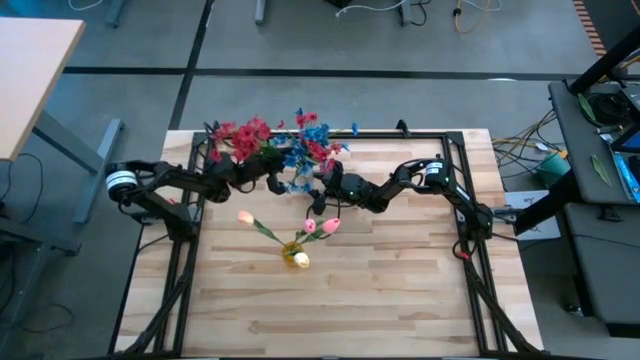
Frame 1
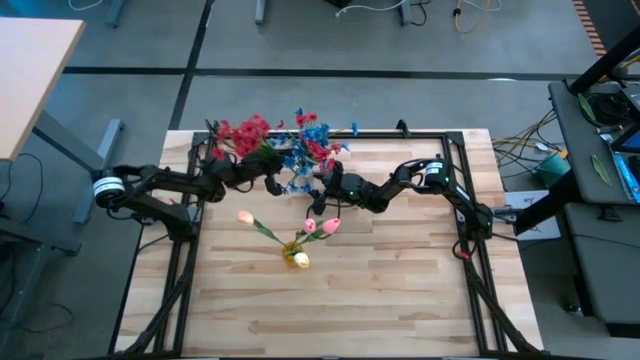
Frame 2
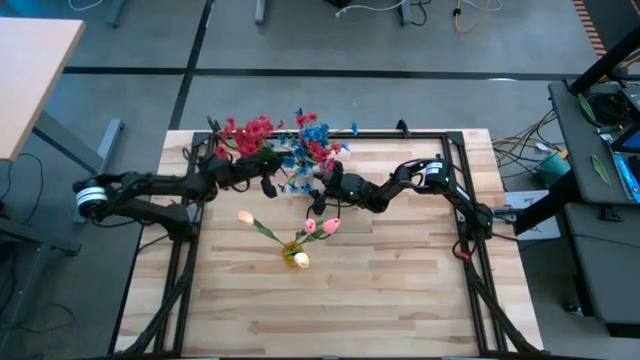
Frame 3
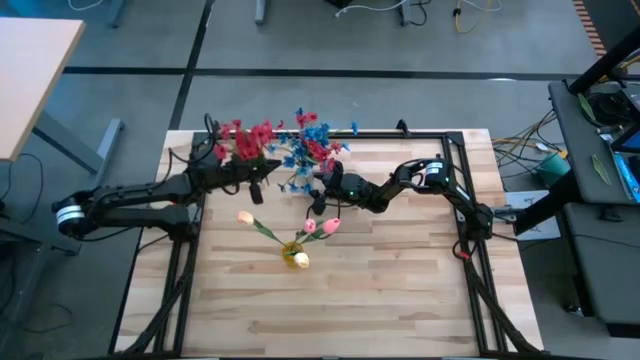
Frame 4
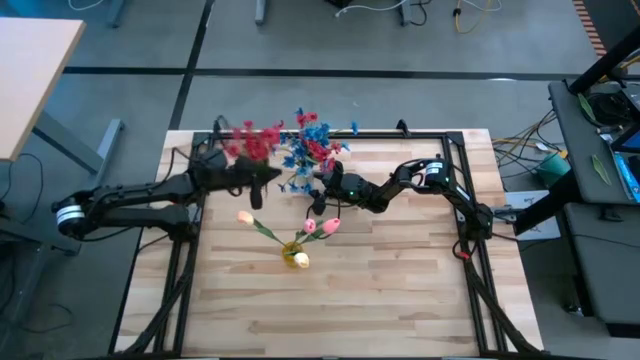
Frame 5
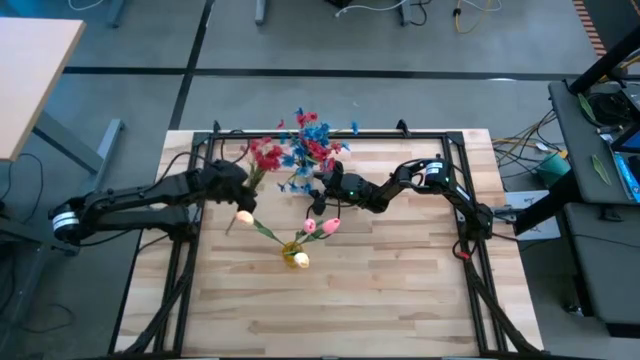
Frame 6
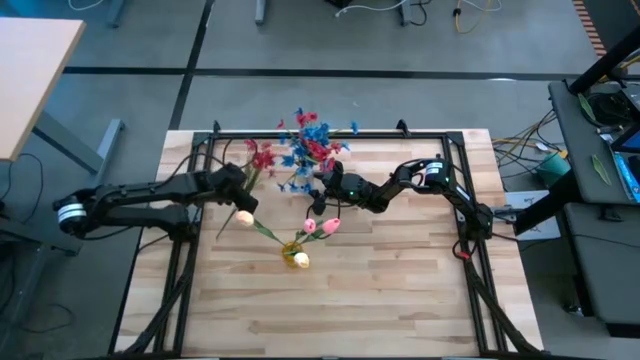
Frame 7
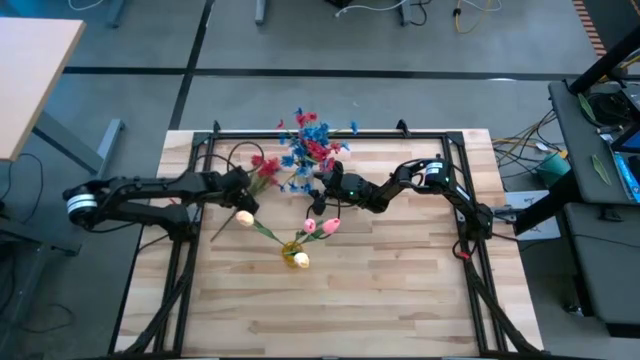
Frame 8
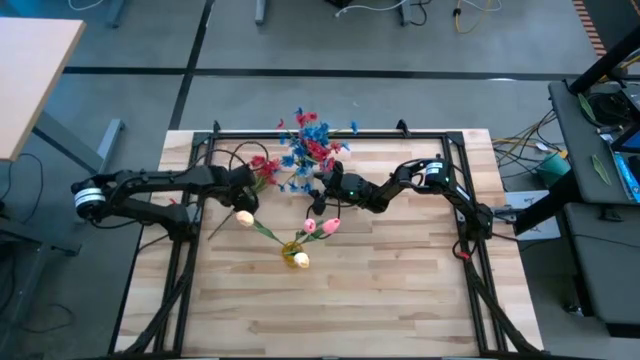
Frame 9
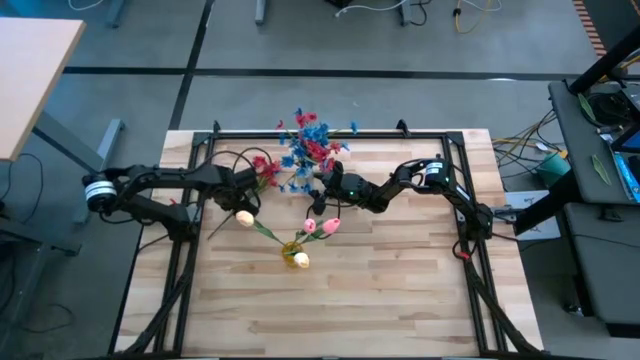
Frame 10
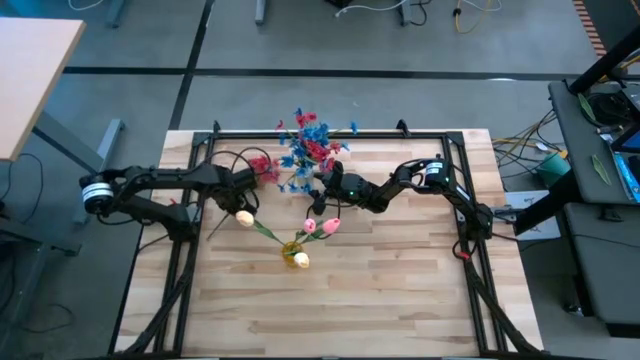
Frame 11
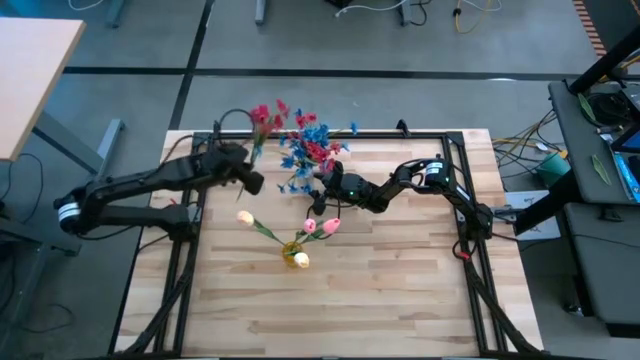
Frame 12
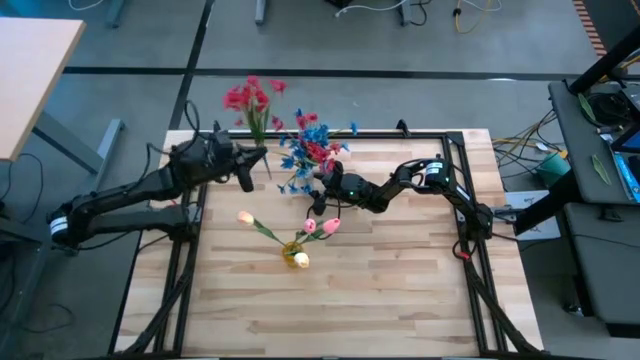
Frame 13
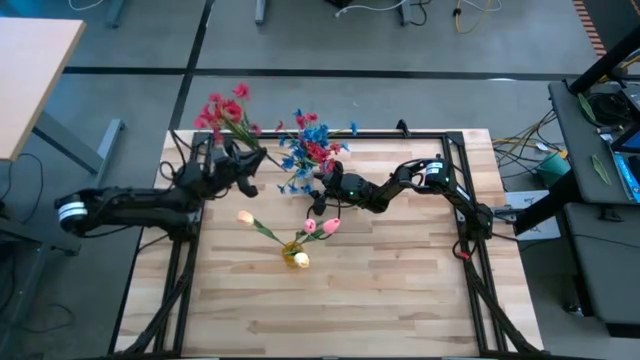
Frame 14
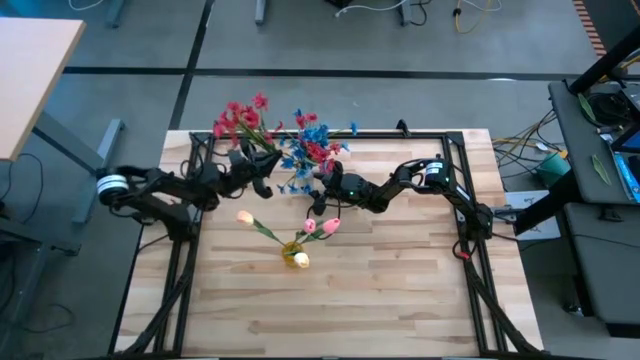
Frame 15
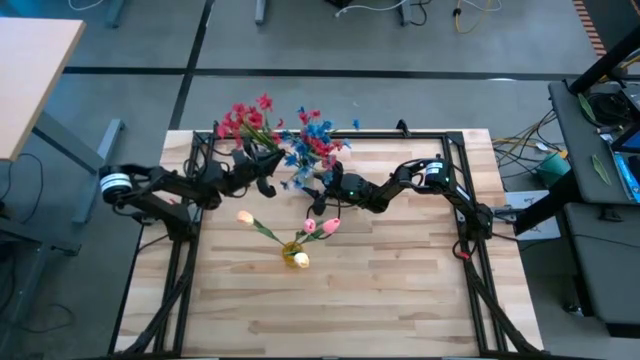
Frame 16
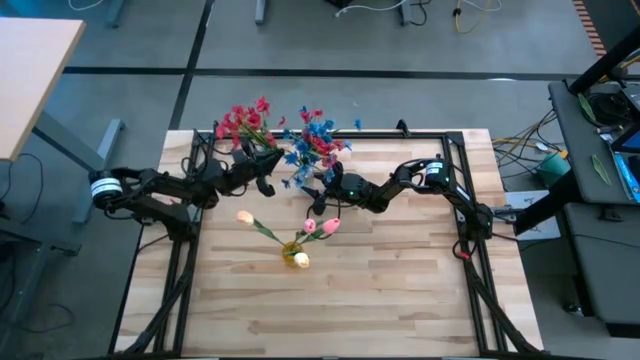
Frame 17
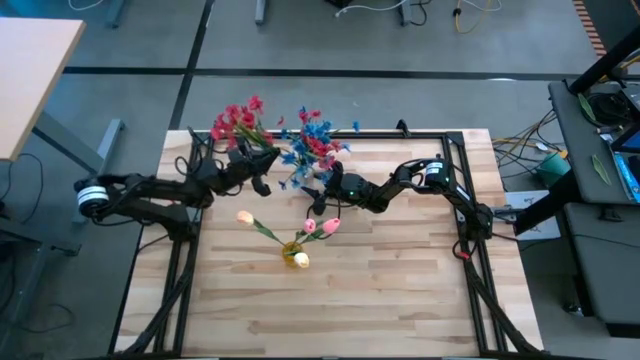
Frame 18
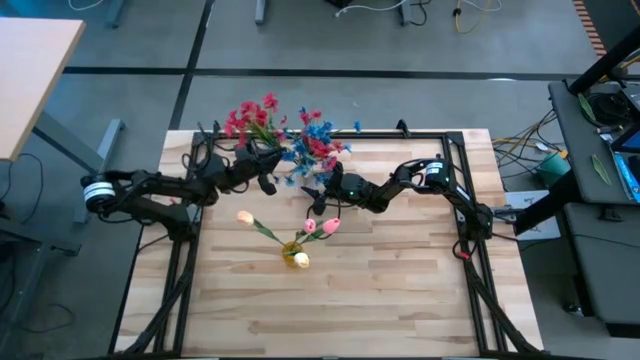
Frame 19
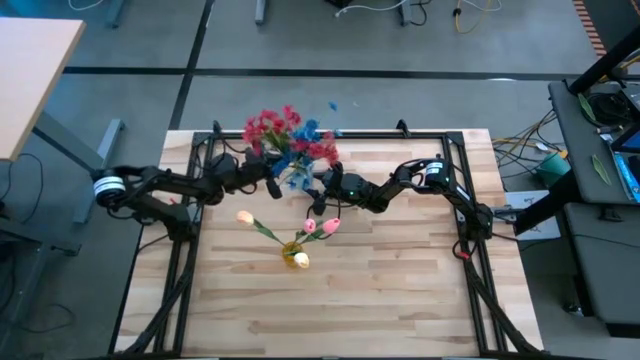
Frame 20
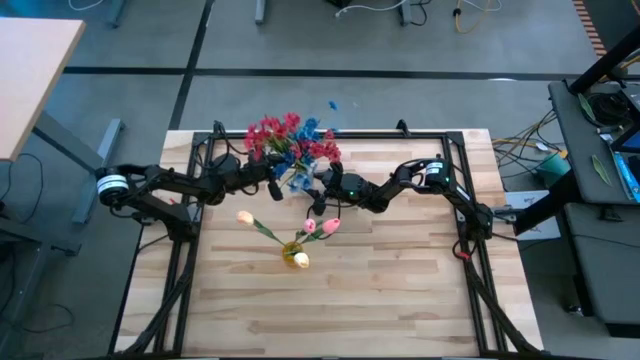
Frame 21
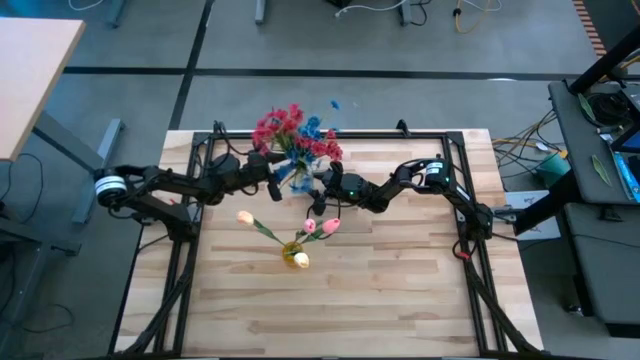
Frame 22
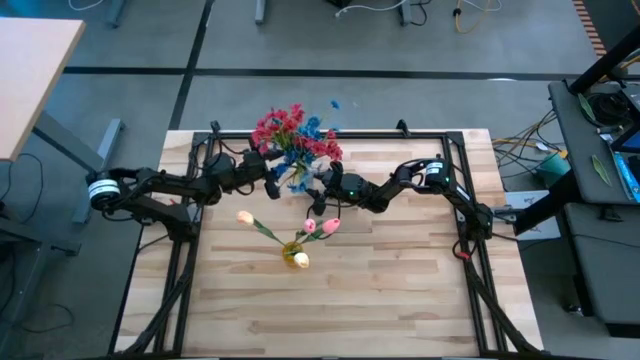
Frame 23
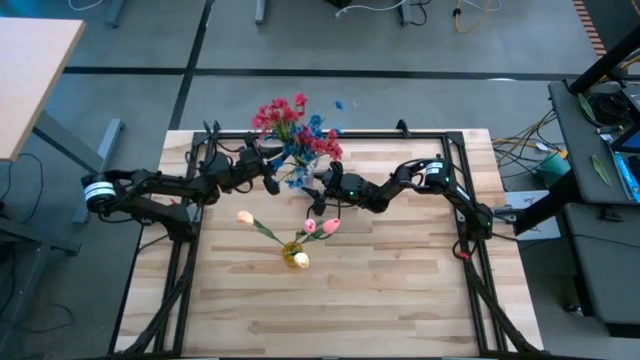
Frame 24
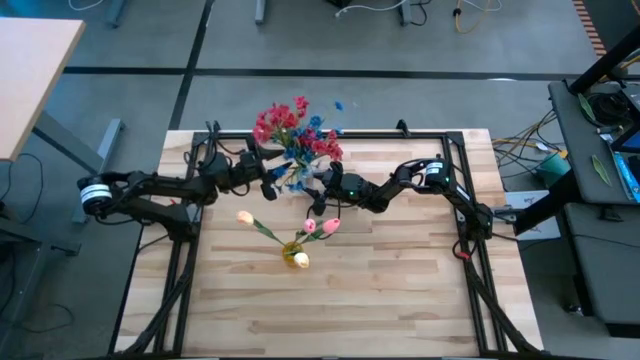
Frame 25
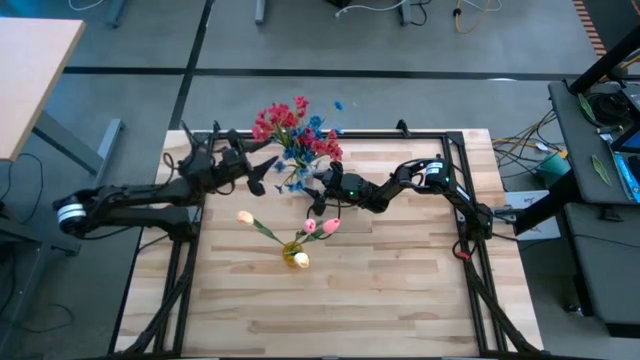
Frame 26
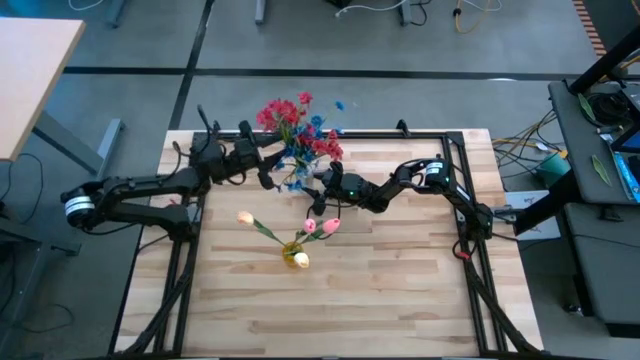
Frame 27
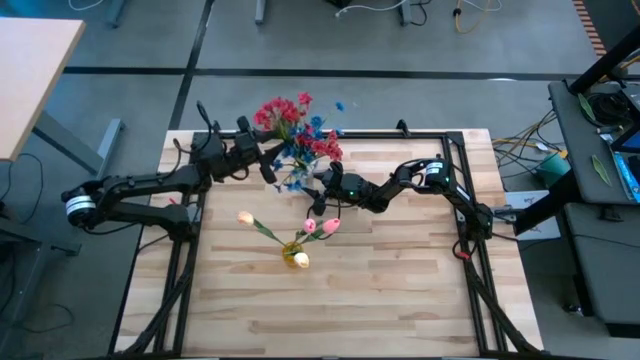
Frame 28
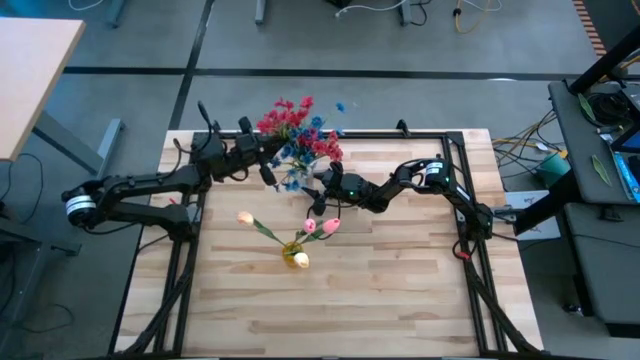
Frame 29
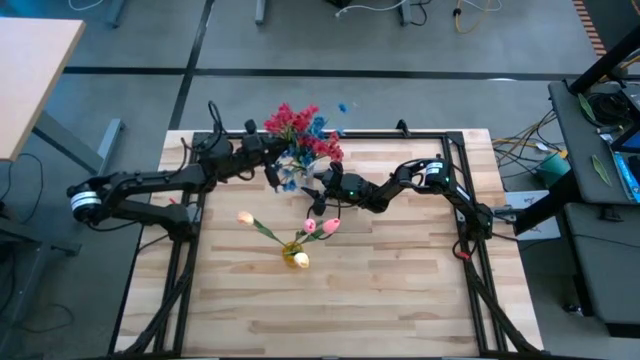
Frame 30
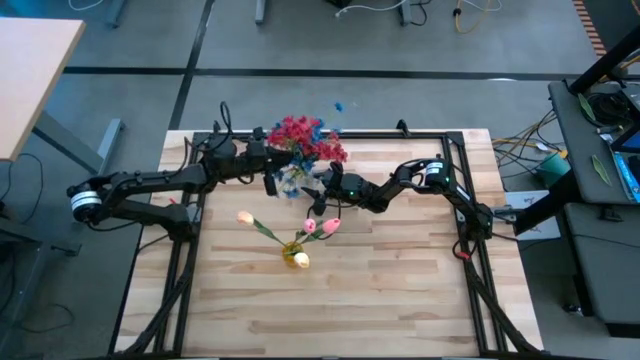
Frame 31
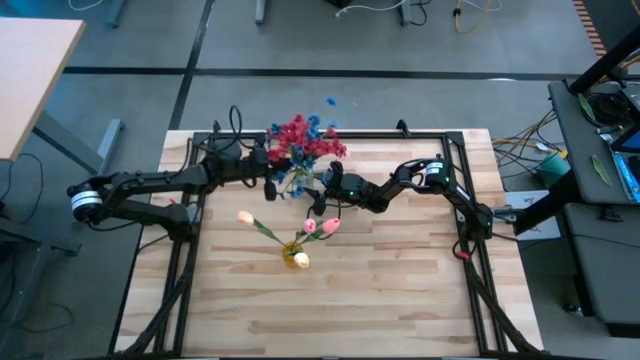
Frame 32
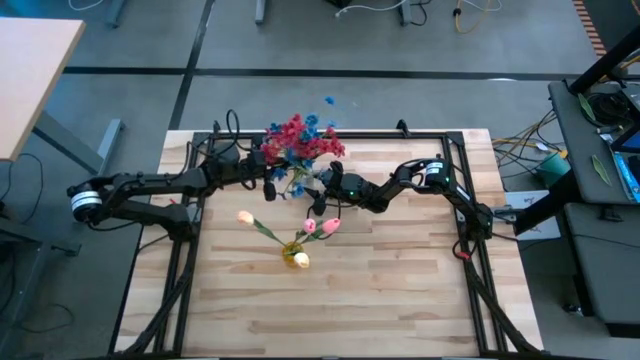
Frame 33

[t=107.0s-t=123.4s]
Task: Sort flowers into vase by color
Put the red flowers into the transparent vase

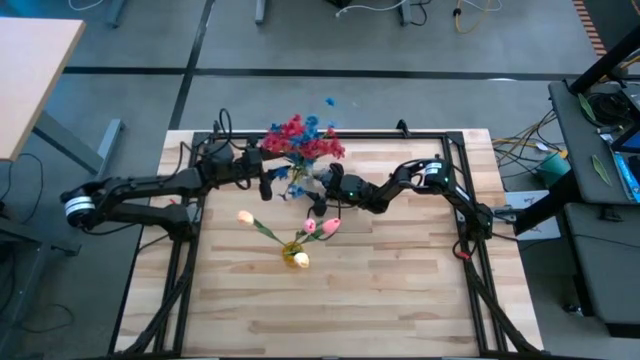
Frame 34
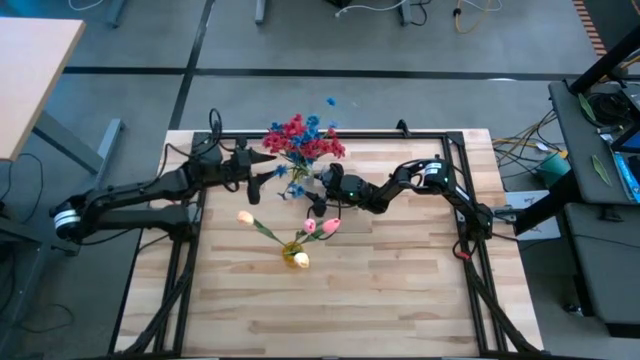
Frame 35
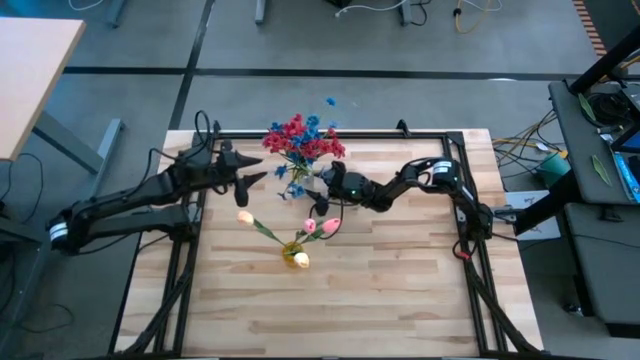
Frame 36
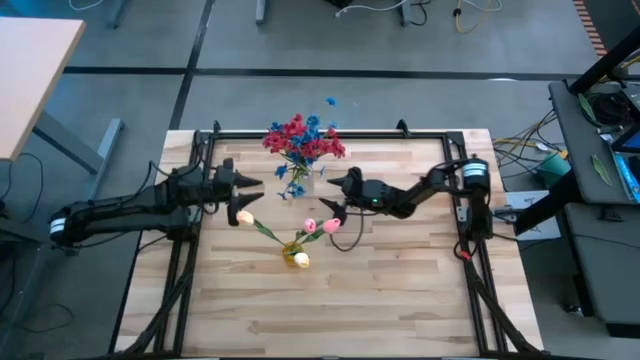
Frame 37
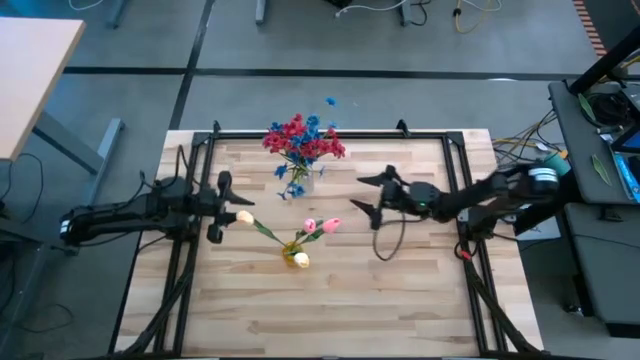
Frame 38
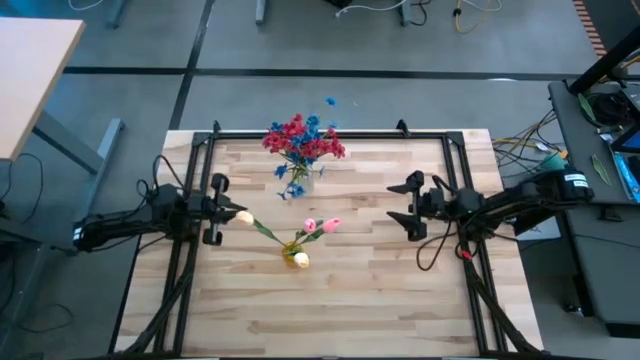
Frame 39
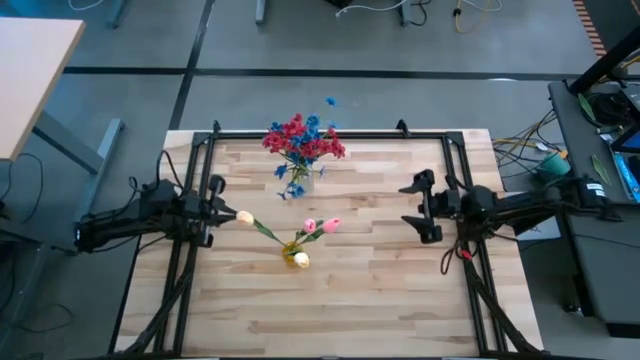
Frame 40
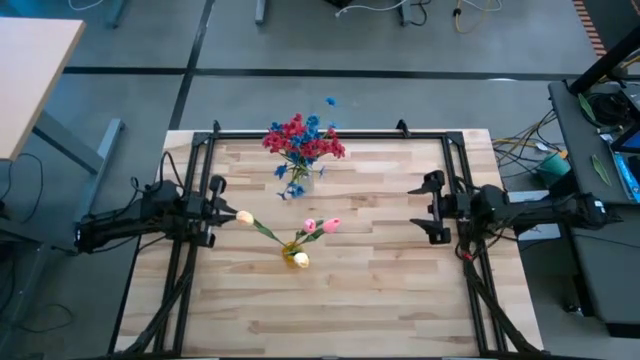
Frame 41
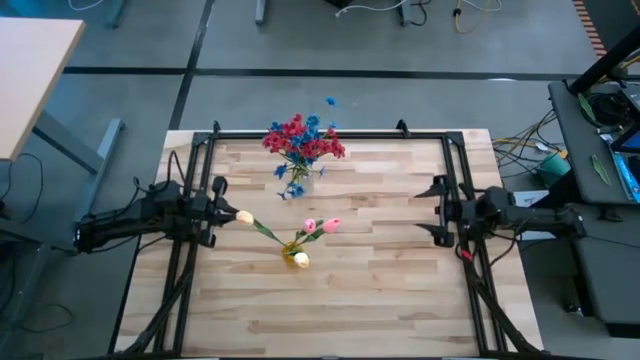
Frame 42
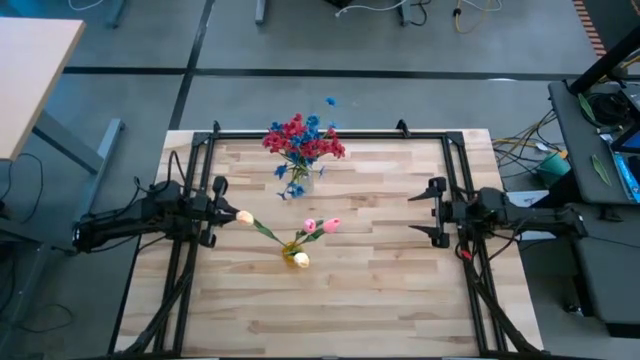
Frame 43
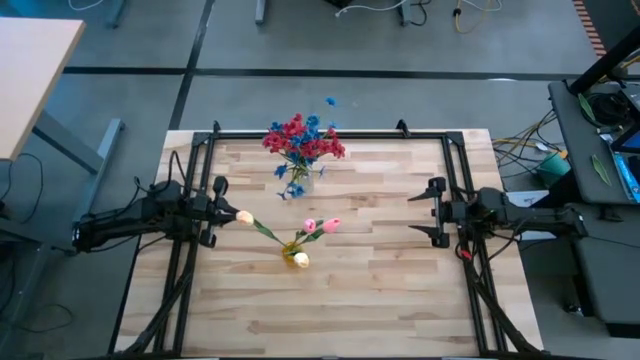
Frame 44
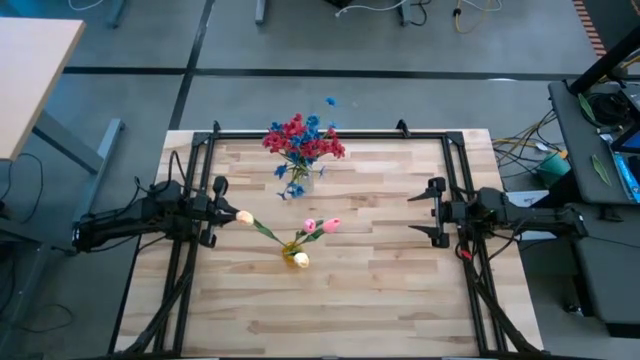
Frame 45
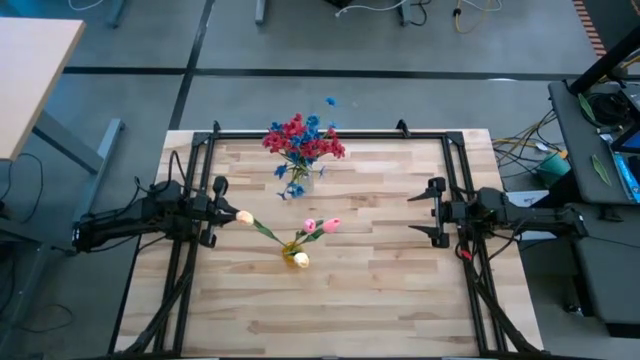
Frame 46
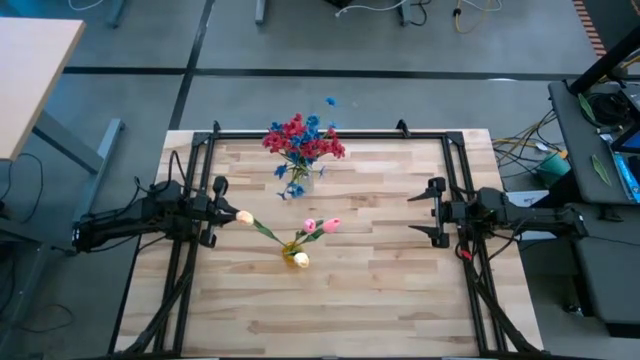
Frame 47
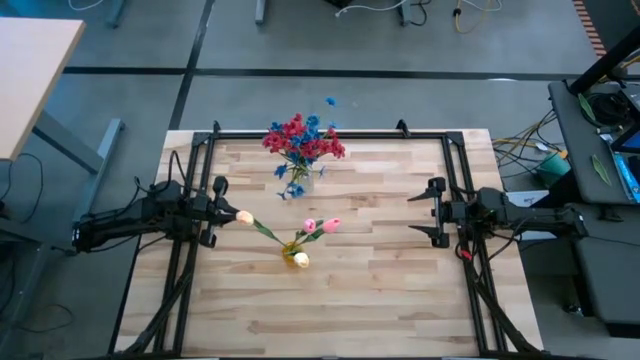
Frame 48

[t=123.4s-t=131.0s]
Return to Home Position
